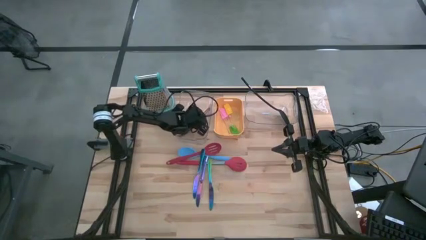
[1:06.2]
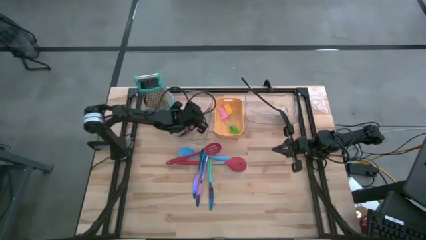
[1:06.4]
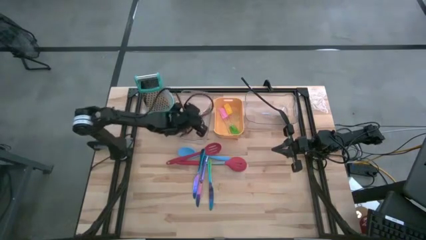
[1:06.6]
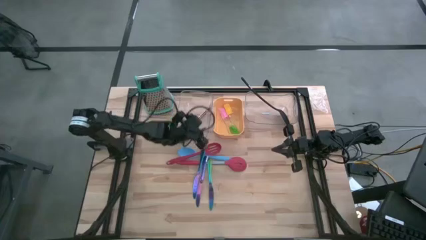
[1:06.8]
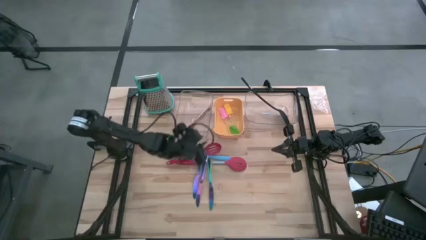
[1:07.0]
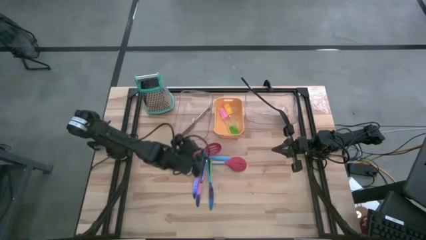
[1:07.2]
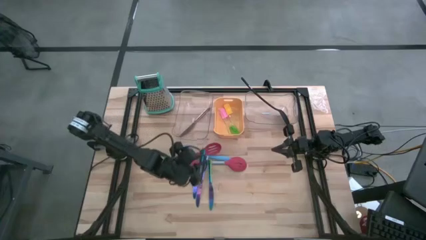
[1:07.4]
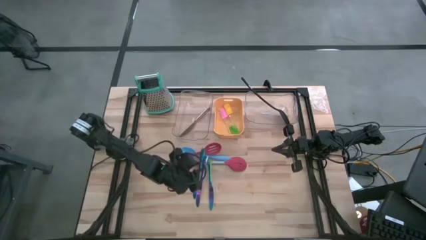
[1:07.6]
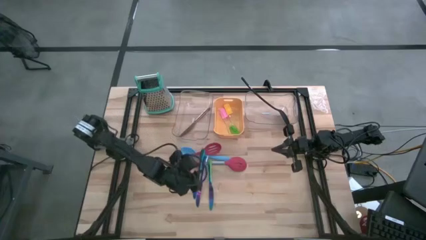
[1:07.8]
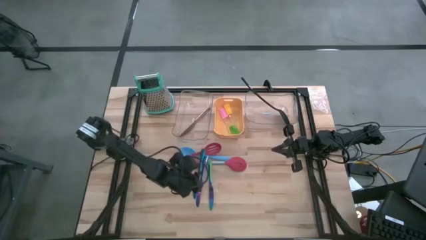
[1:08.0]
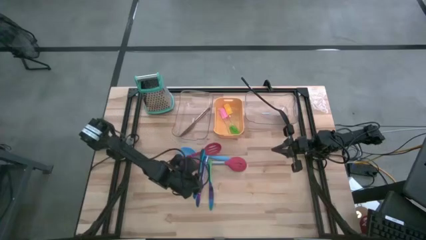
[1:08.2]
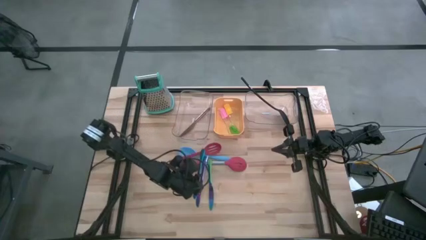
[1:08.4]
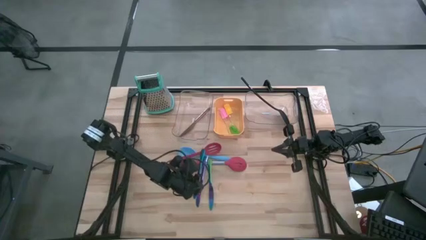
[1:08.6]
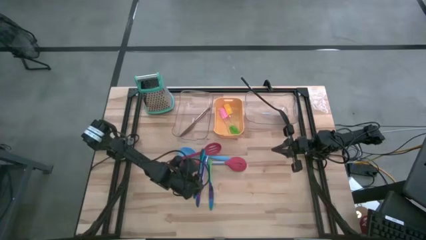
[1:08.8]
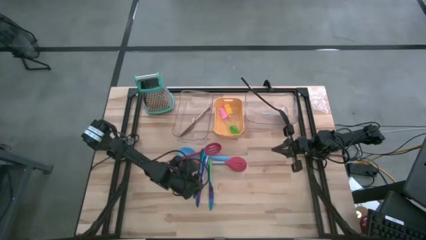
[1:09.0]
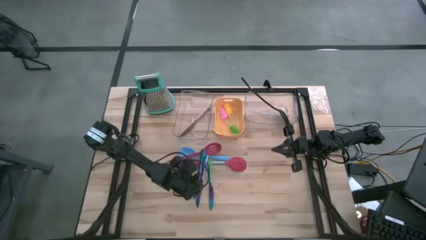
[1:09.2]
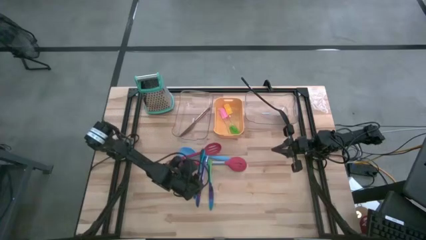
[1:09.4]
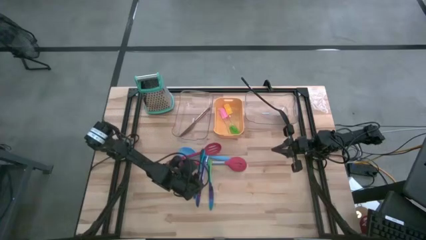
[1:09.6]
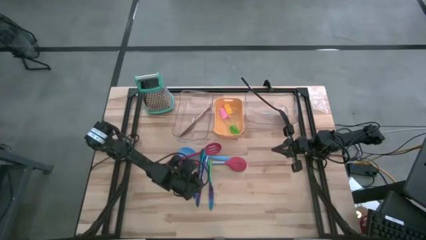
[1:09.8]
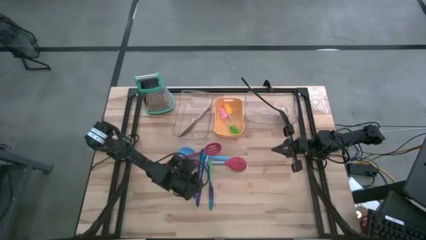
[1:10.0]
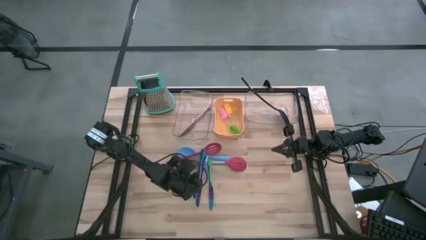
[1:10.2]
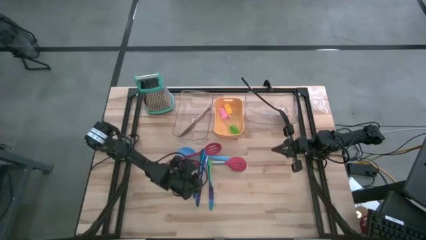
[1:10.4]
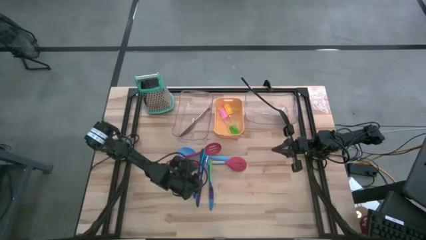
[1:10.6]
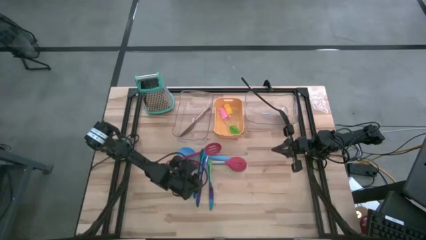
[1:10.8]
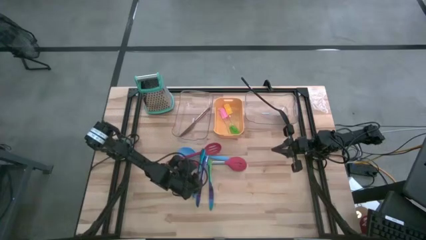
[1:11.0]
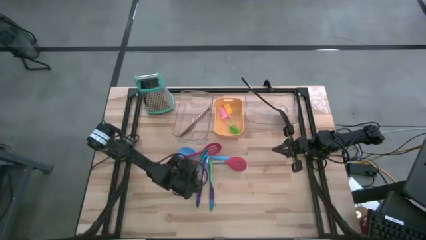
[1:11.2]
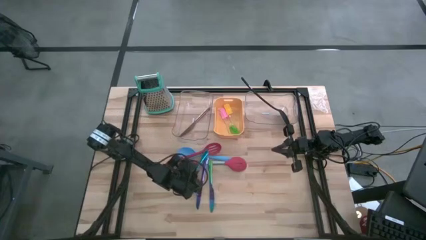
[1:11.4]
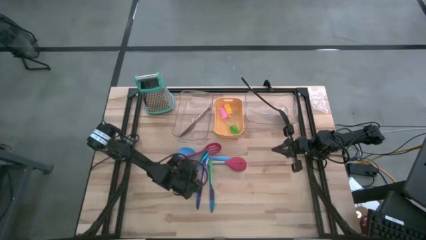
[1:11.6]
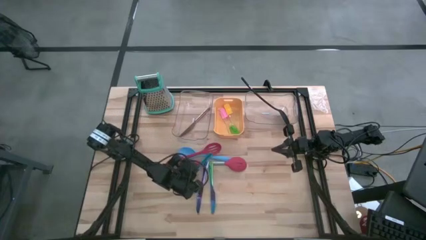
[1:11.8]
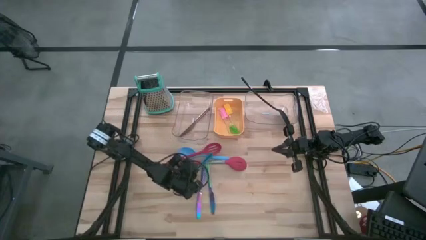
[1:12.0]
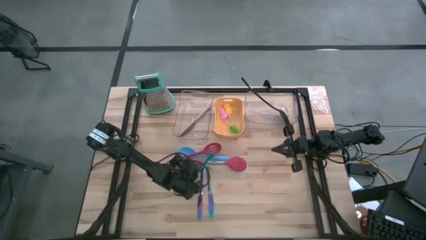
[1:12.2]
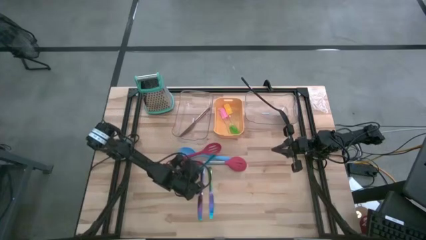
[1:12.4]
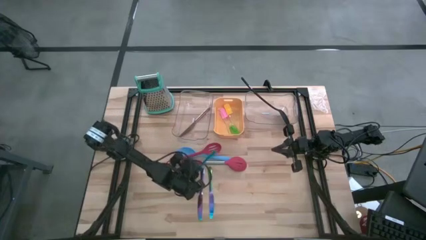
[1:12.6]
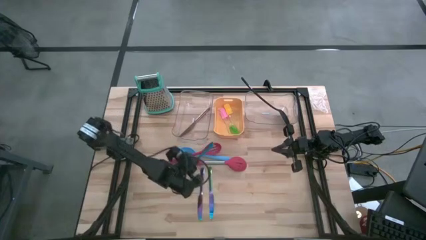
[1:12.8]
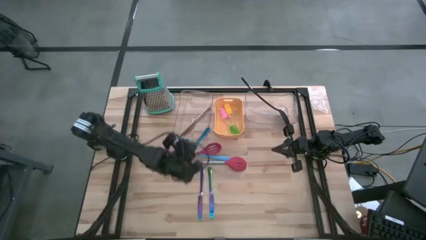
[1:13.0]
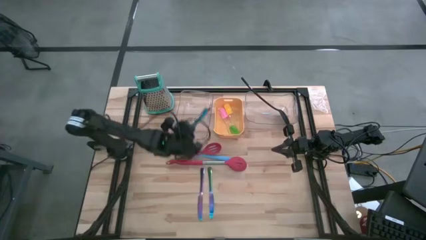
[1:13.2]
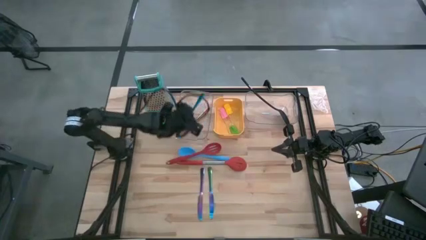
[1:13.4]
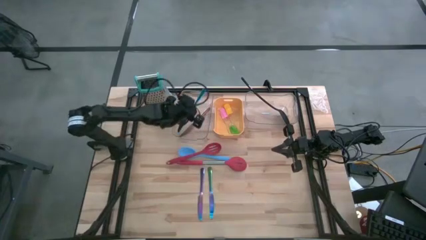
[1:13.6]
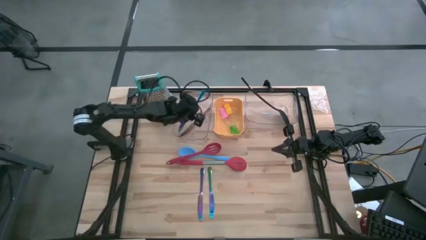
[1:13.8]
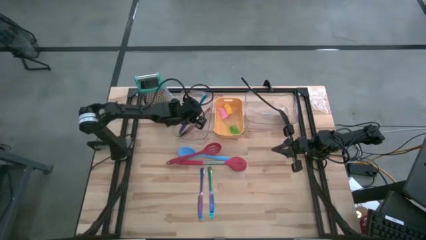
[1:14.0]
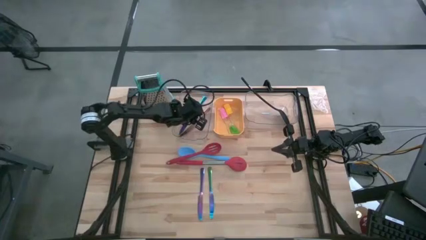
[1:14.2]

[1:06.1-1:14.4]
Task: Pick & Place Kitchen Items
Put the left blue knife into the left transparent bin

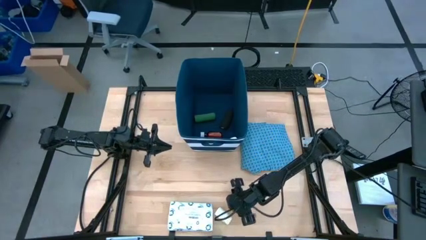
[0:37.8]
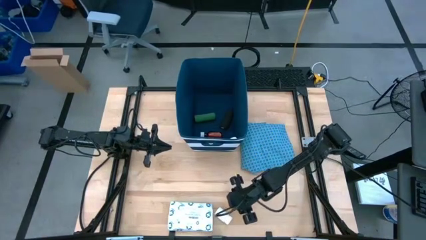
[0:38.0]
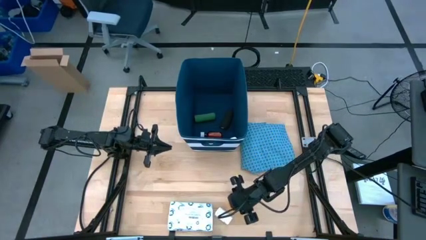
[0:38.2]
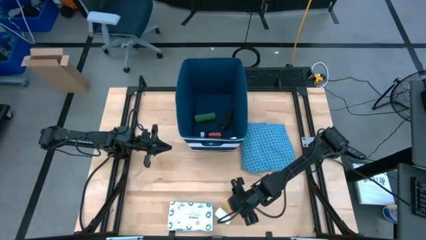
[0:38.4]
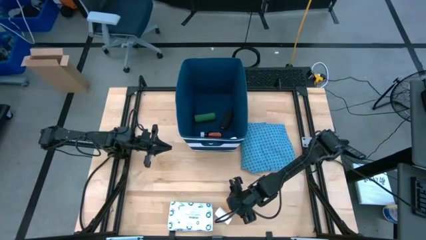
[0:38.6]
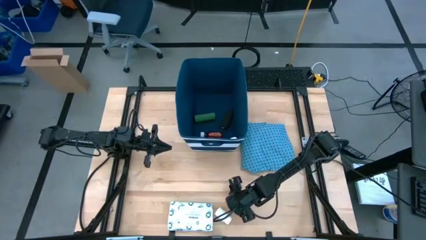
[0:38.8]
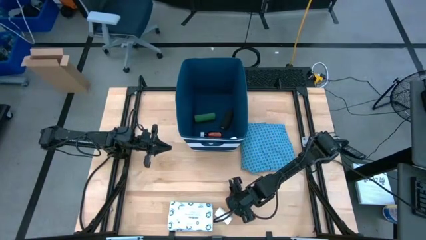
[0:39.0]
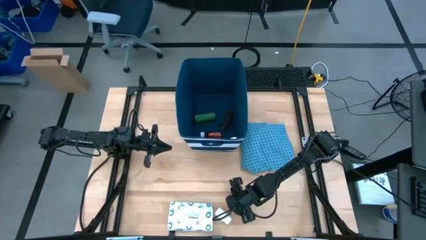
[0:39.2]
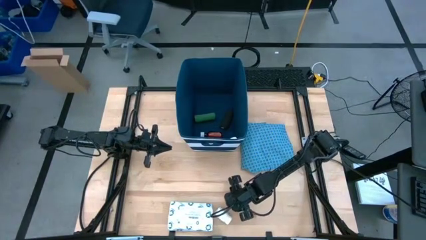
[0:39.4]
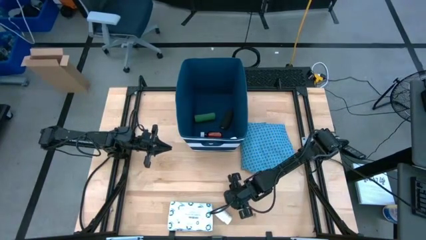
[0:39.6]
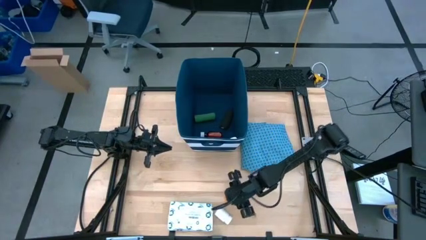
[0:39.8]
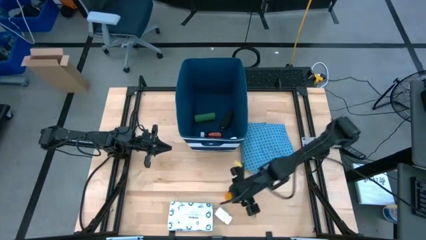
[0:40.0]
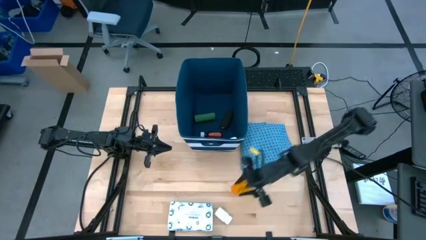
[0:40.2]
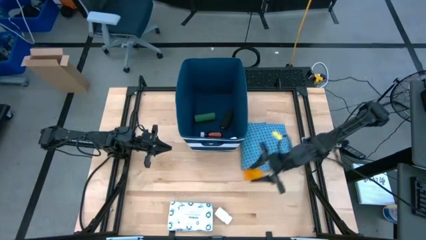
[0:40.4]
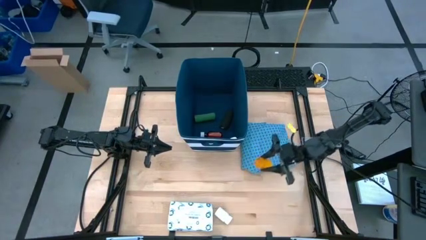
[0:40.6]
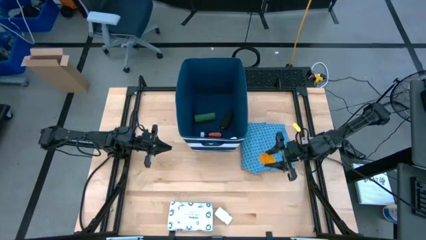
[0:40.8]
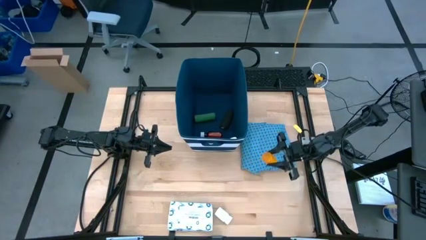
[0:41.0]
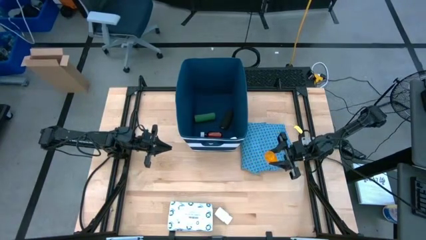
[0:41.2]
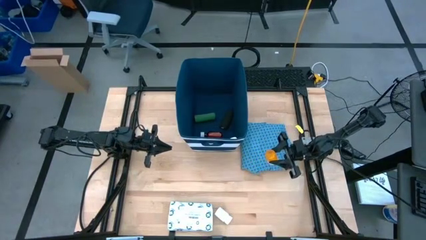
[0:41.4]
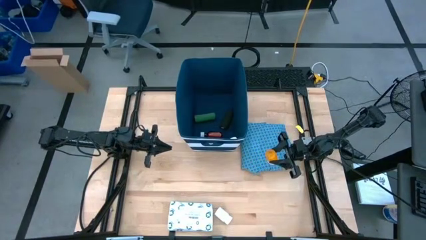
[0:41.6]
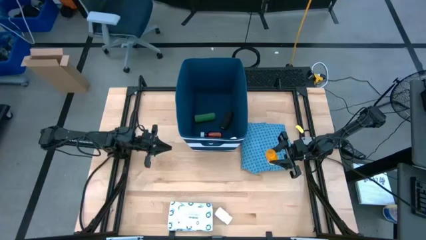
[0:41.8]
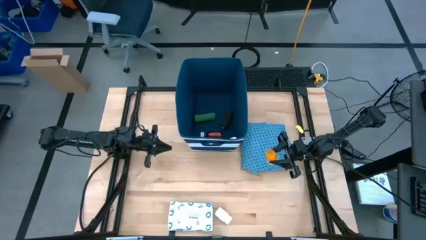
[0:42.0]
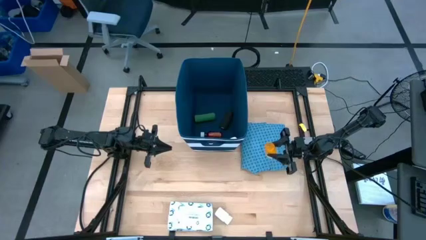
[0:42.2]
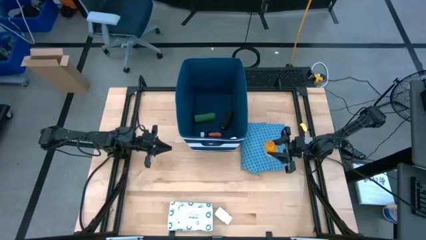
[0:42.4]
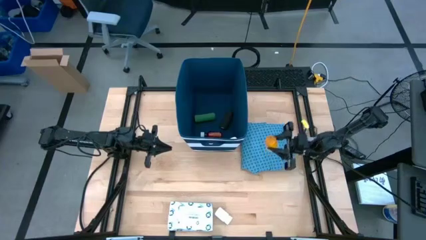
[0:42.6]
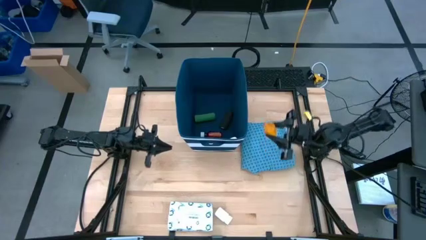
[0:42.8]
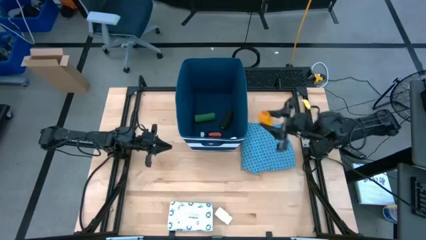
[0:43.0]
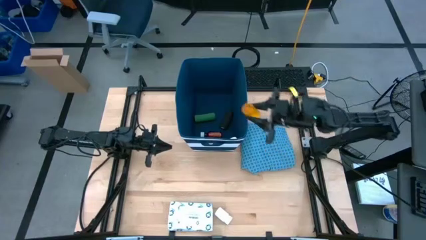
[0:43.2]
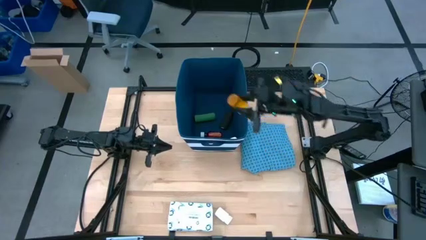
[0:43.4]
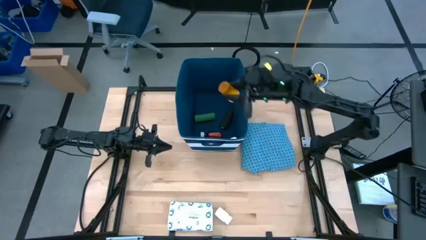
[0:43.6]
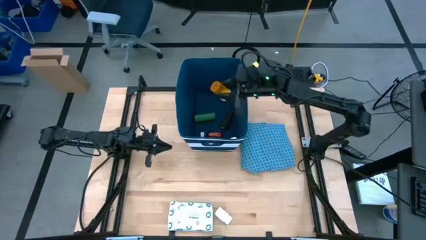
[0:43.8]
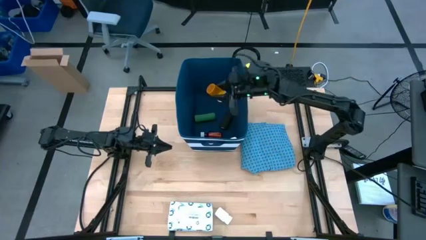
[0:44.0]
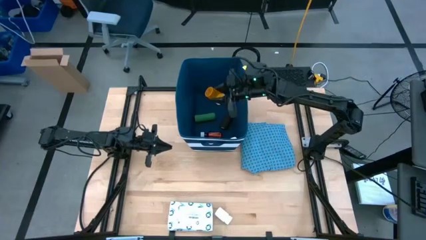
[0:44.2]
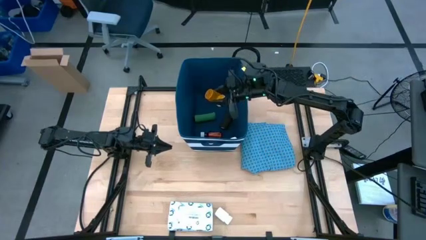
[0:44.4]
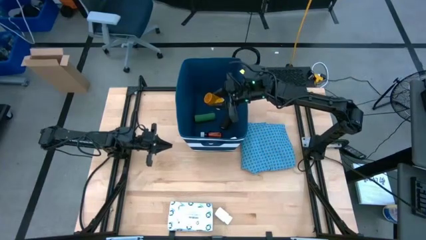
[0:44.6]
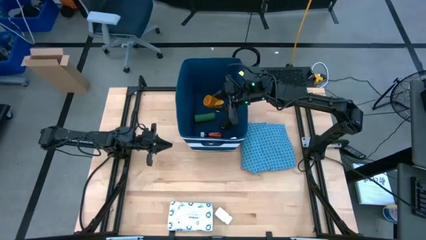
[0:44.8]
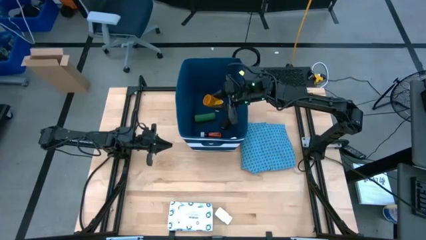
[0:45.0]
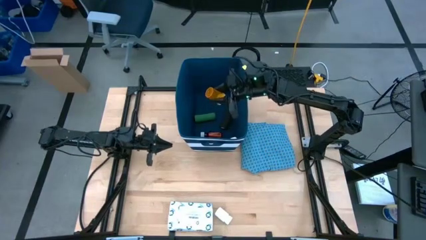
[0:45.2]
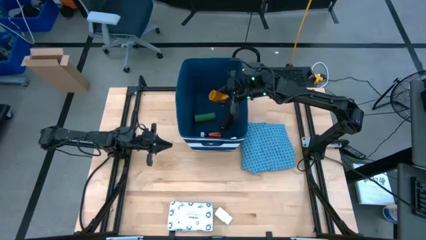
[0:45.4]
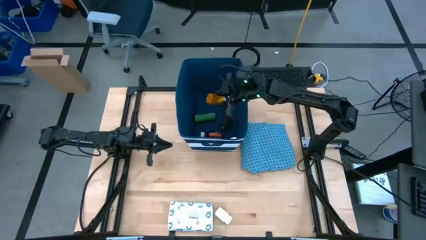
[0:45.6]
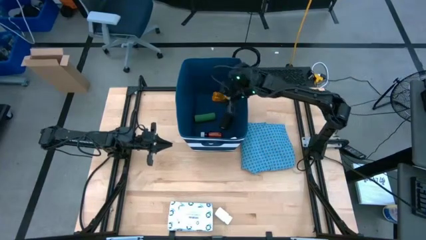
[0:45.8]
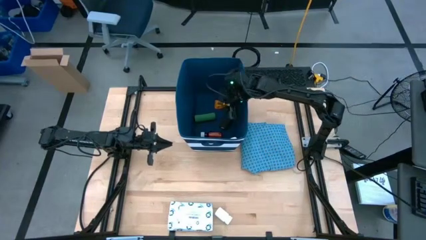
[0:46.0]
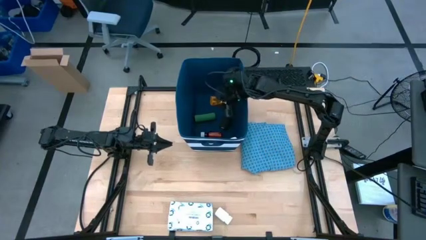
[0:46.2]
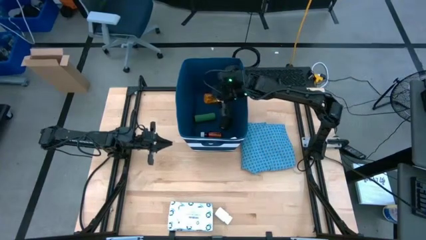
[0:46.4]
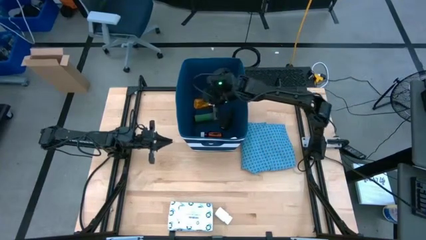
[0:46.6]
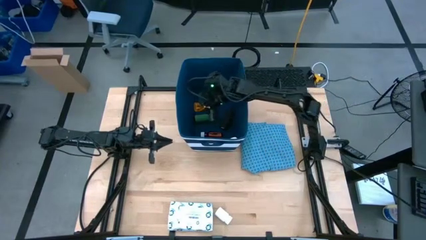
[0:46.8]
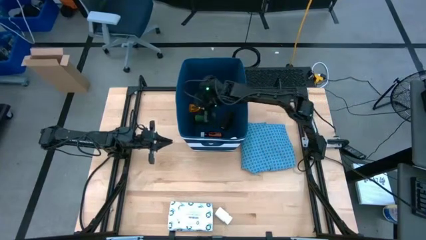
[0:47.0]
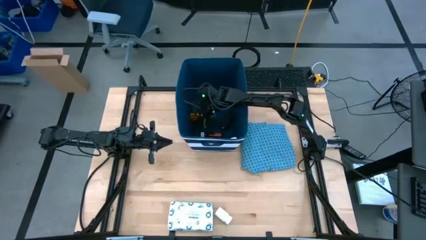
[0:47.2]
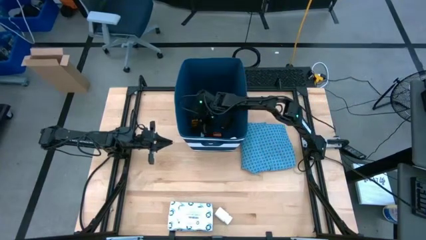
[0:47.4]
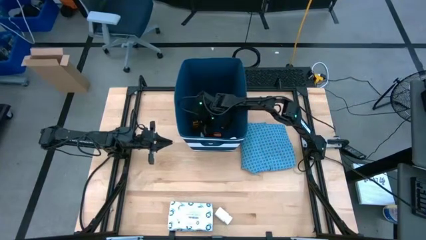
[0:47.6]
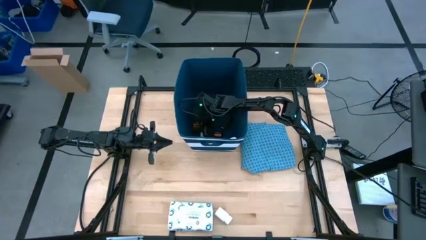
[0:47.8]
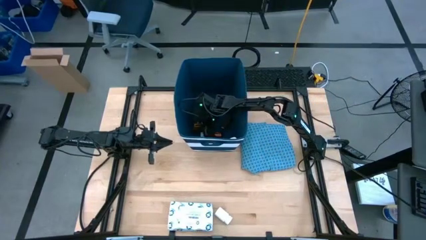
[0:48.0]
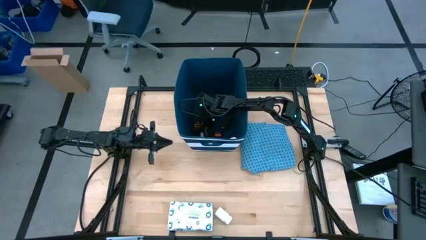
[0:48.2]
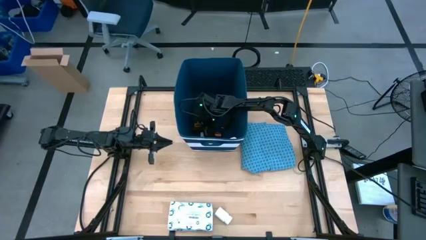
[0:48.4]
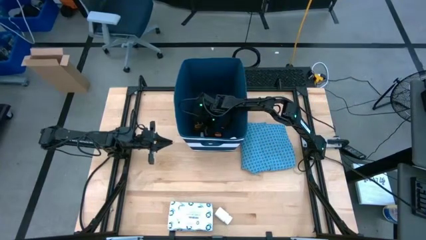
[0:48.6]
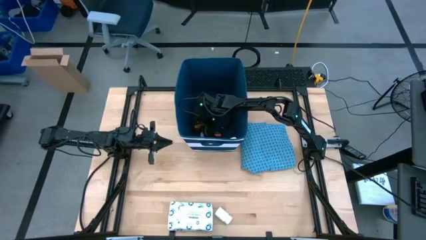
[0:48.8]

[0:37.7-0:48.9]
Task: Pick & place medical supplies in basket/bin
Put the yellow medicine bottle into the blue bin
